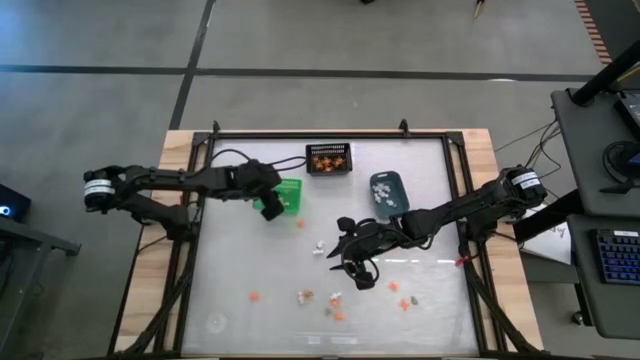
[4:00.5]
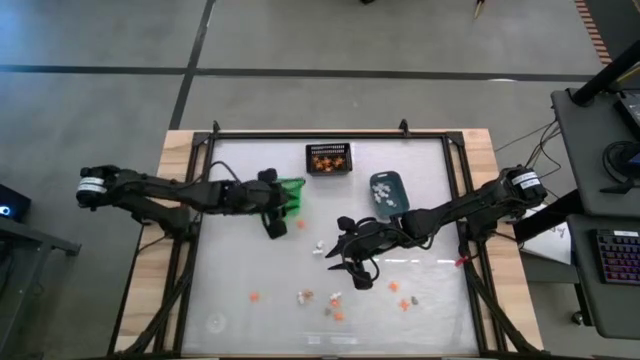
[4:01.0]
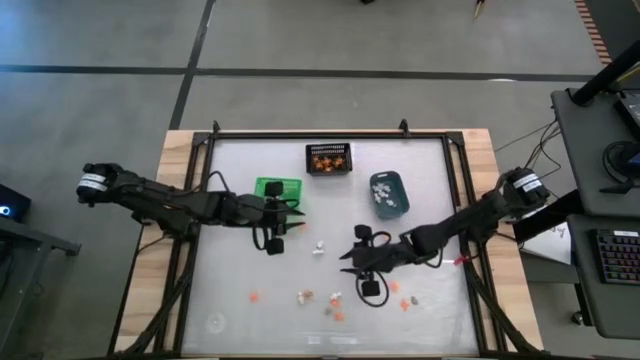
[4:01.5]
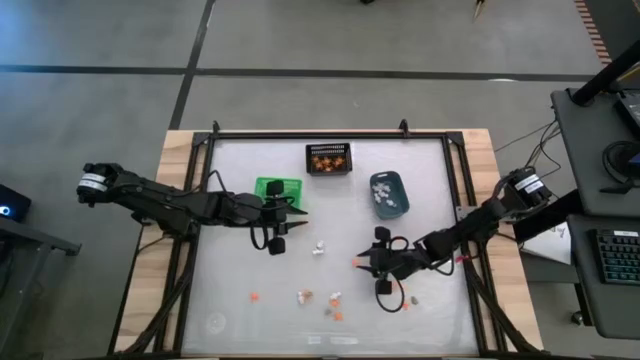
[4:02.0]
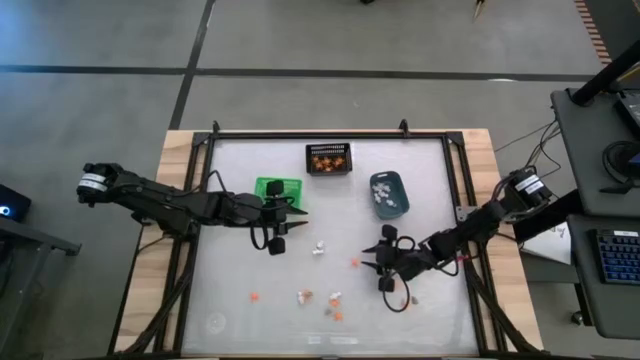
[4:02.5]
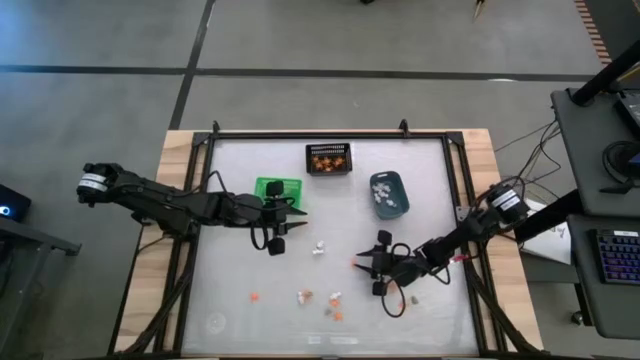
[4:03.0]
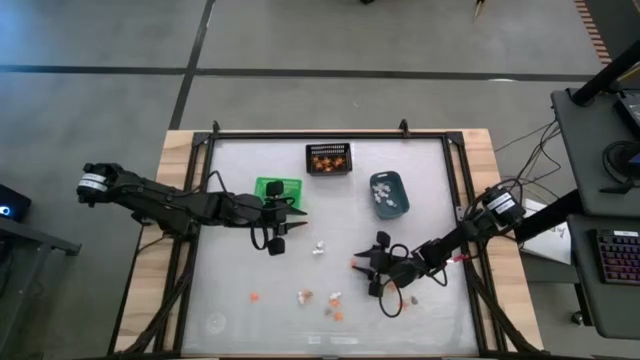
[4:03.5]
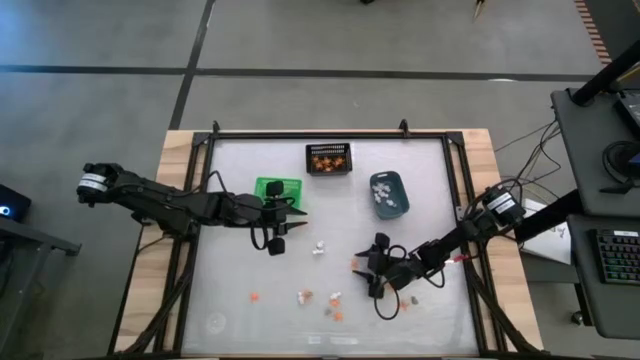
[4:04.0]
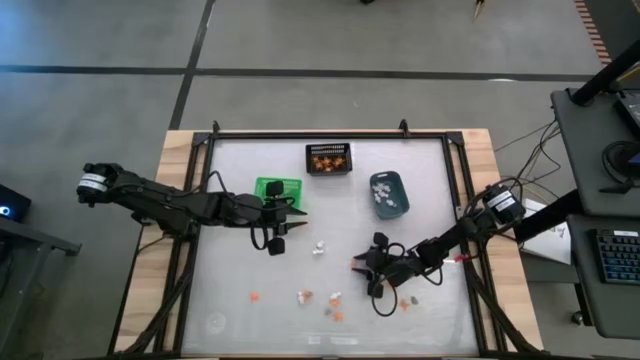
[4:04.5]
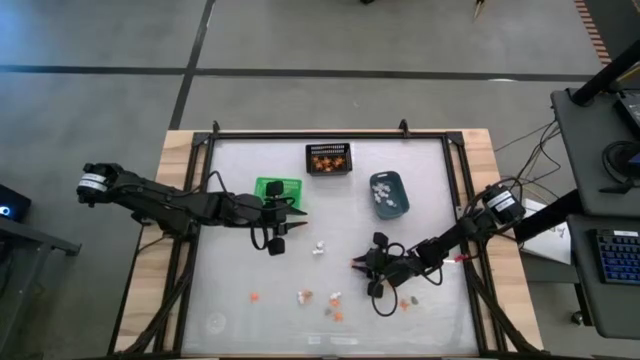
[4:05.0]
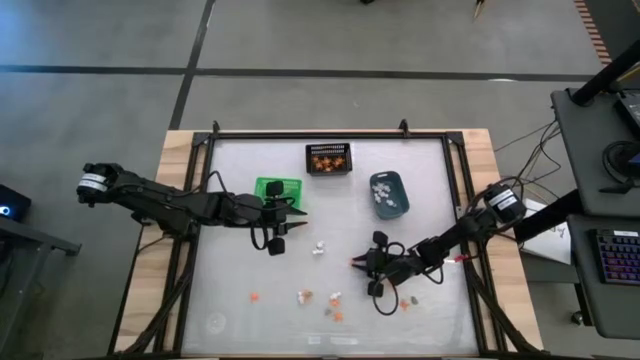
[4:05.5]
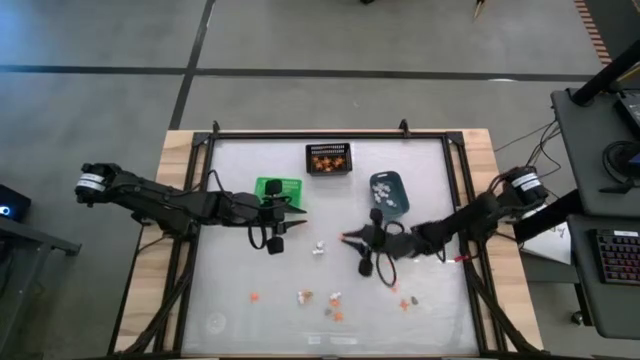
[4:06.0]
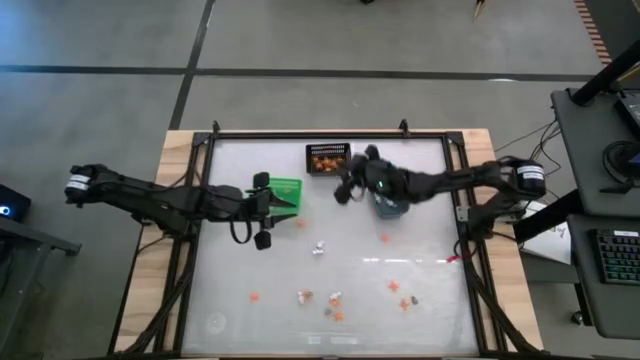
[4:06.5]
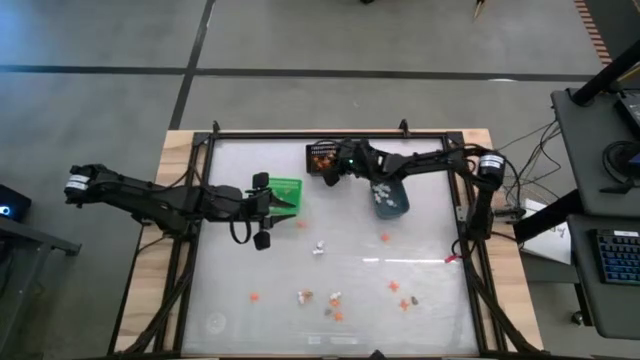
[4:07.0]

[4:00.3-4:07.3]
Task: Sort Halloween decoration
Put the orange spider toy into the black bin

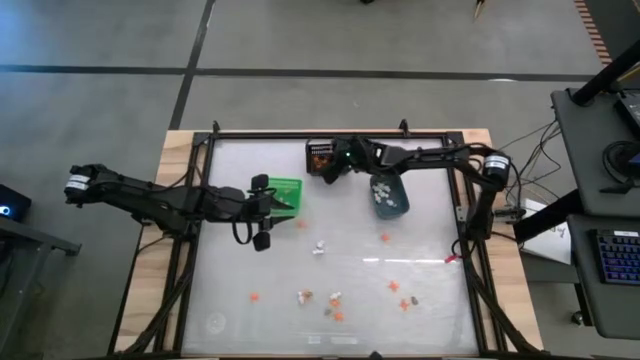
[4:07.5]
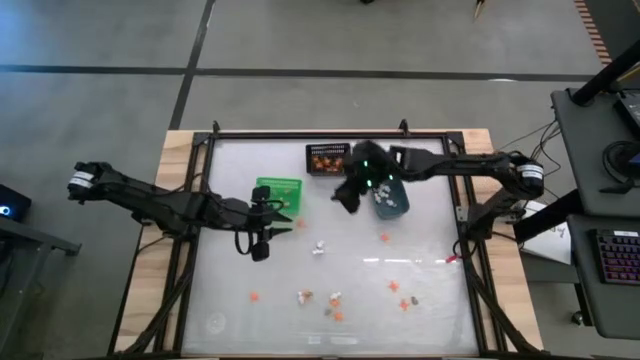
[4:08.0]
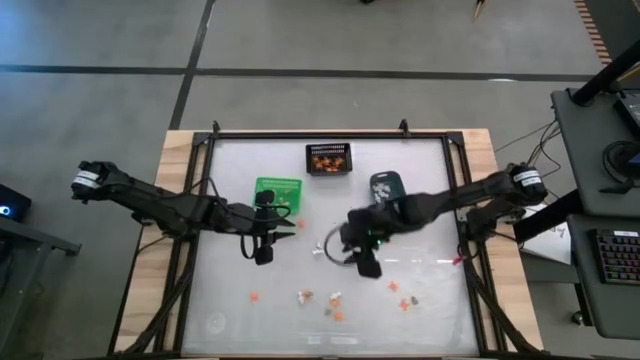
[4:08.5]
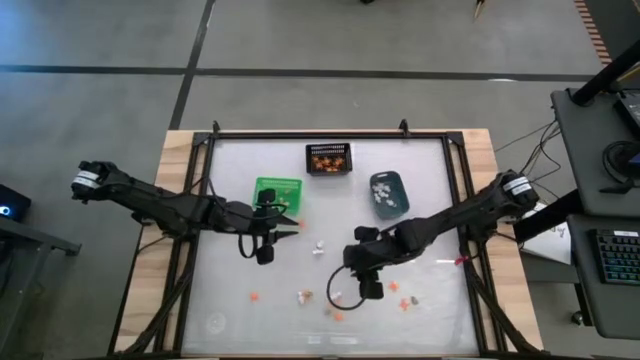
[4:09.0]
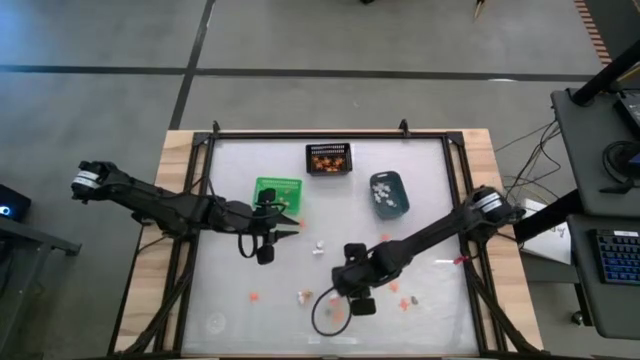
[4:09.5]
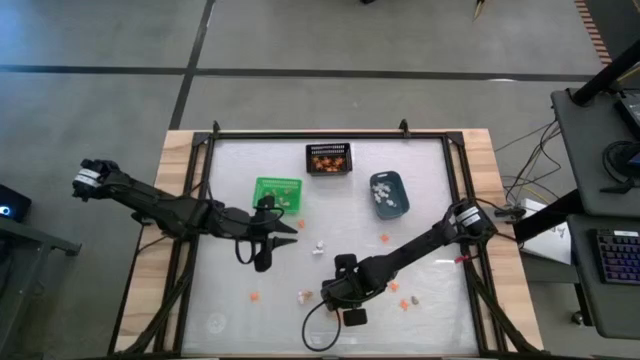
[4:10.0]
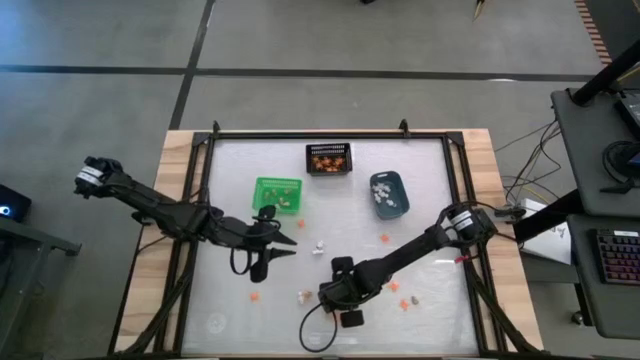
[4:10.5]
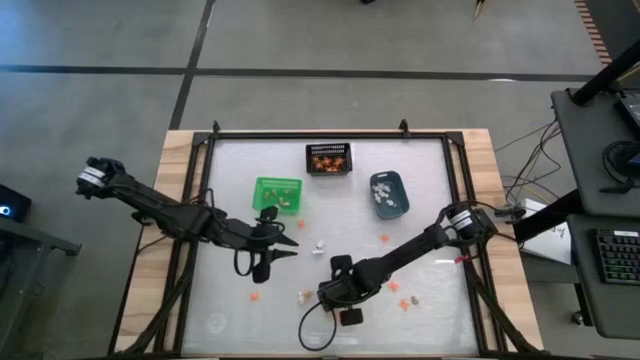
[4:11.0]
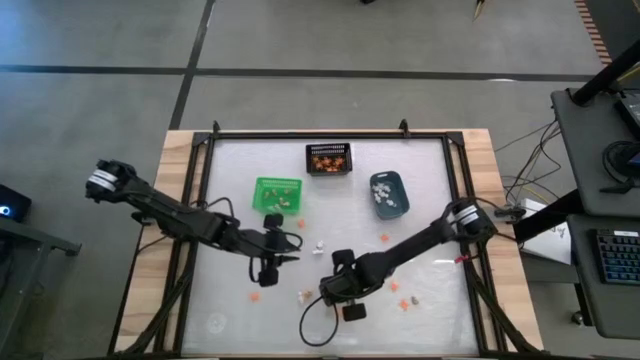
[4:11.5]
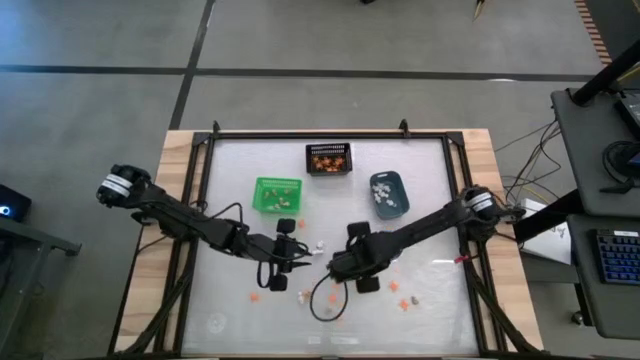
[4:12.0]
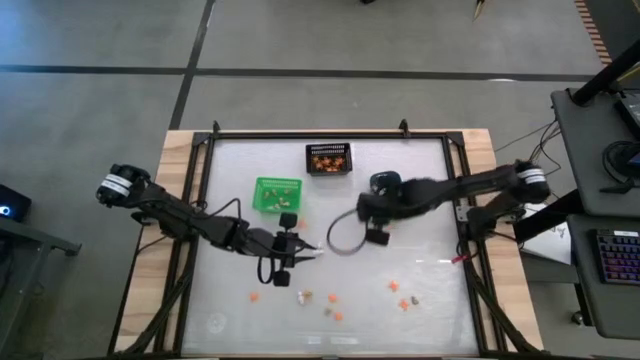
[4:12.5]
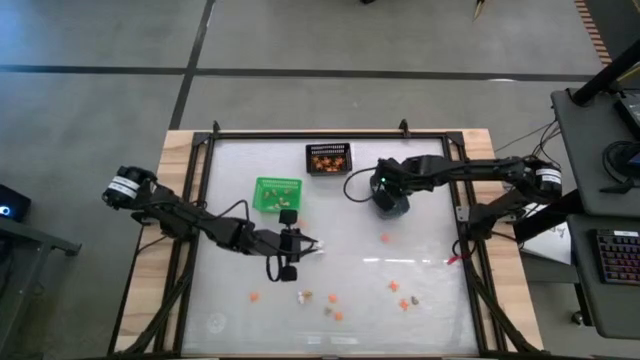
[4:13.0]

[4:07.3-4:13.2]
Put the white skeleton toy into the blue bin

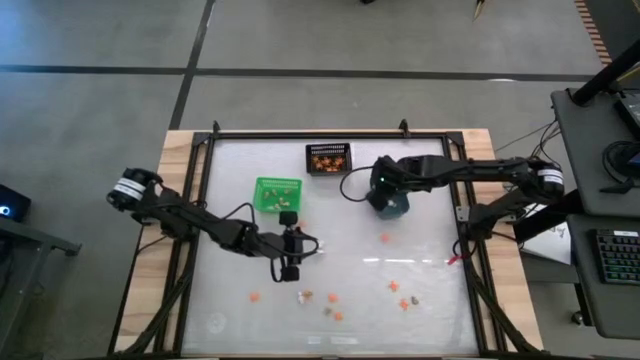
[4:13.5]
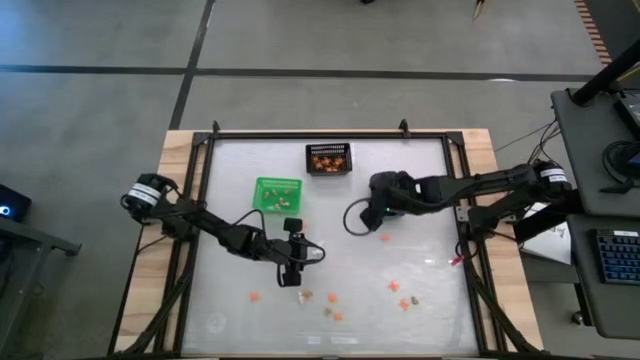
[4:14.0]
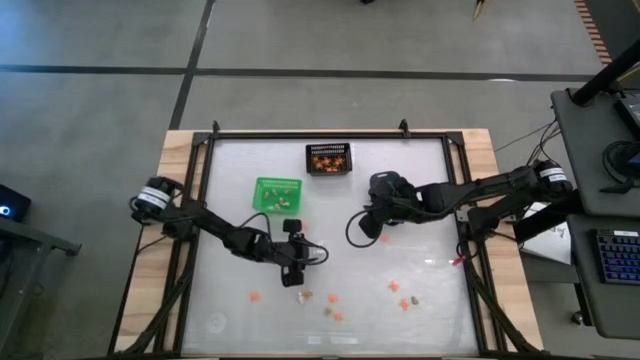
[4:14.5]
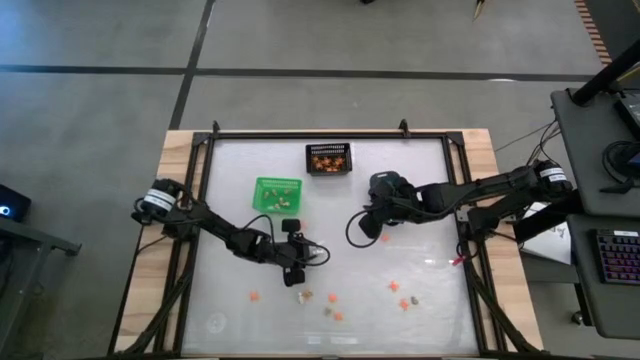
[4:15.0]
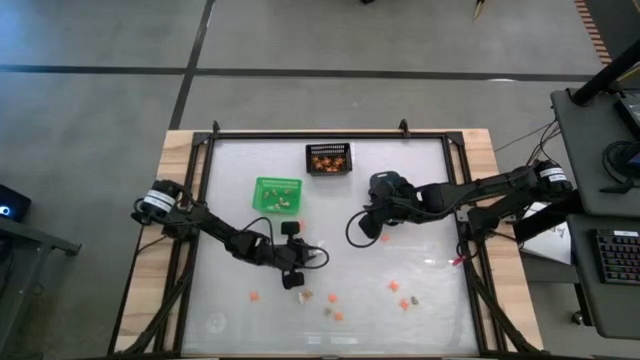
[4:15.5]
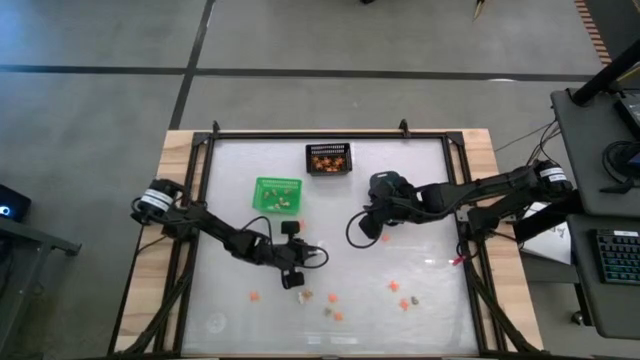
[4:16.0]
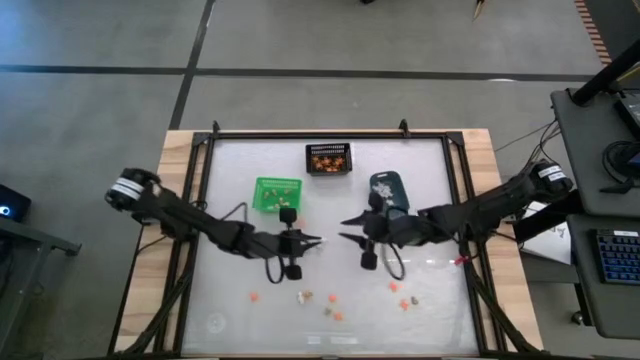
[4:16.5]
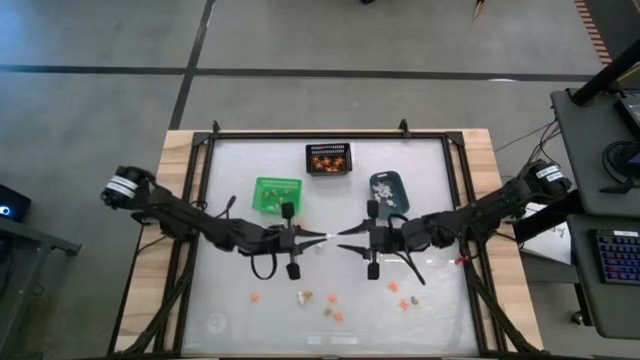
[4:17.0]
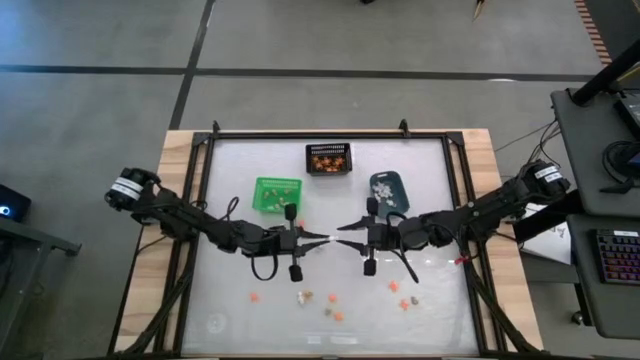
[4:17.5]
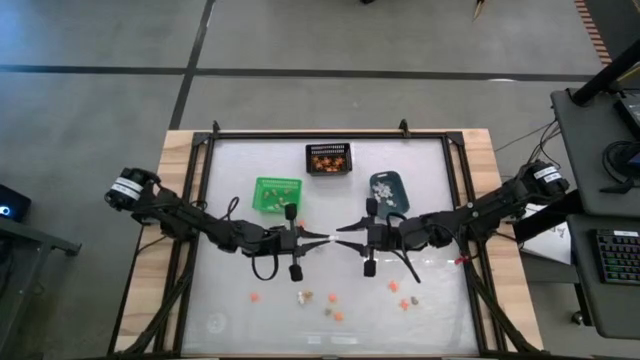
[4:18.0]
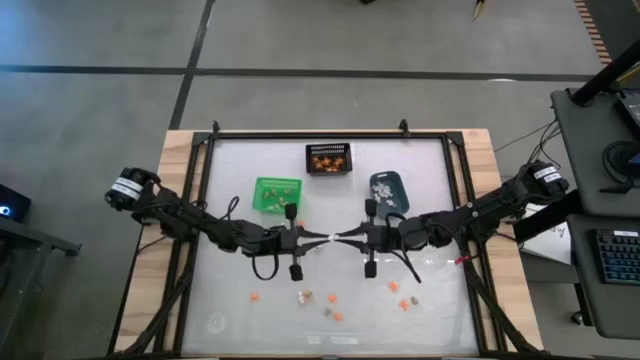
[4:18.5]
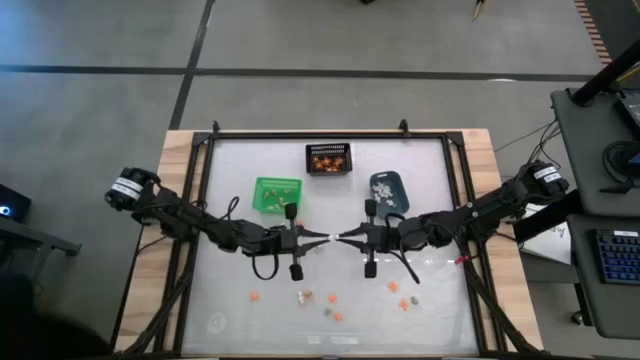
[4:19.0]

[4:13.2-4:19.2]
Put the white skeleton toy into the blue bin

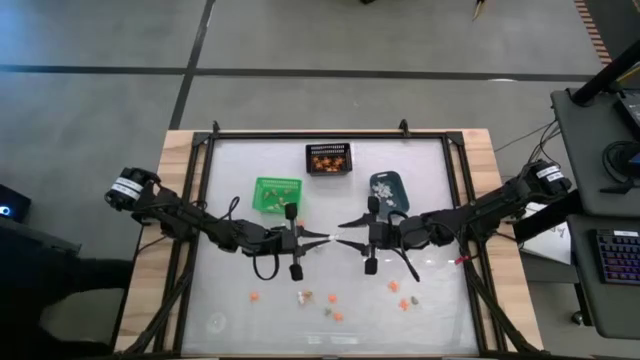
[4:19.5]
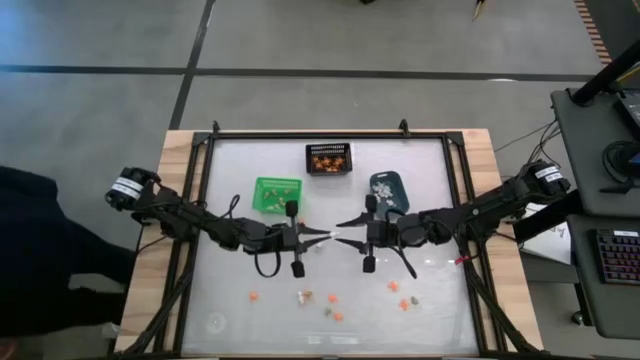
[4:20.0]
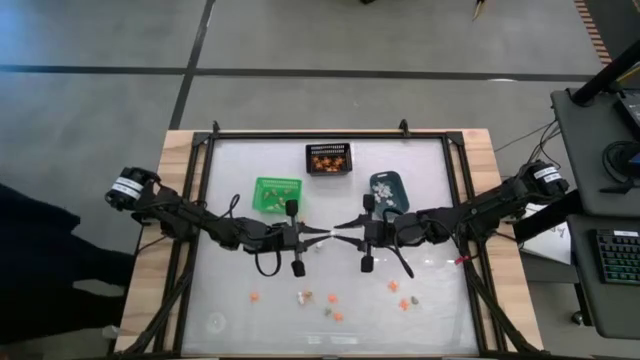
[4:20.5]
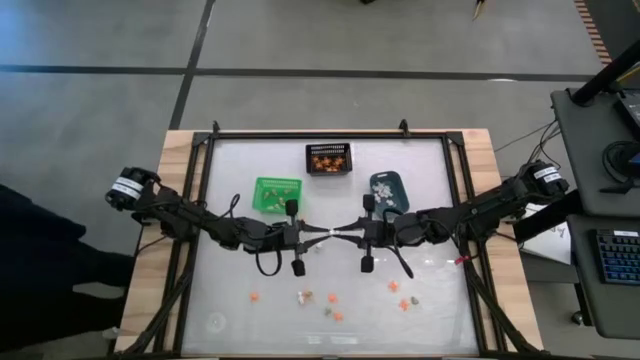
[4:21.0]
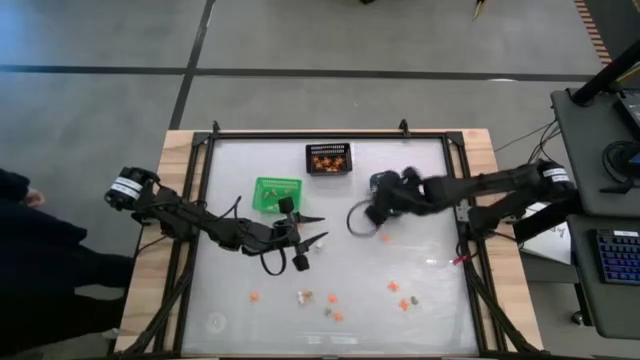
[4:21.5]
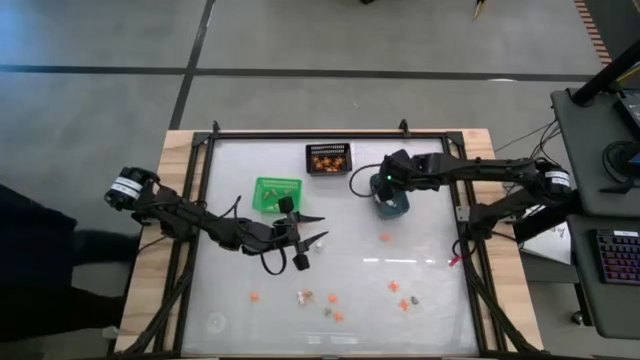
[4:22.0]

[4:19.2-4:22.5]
Put the white skeleton toy into the blue bin
